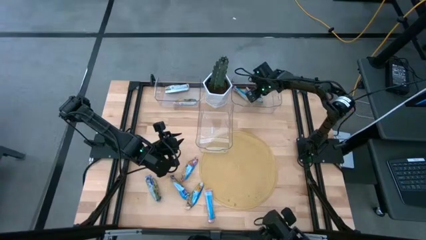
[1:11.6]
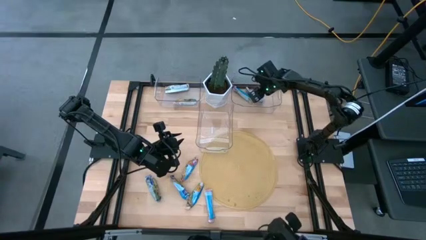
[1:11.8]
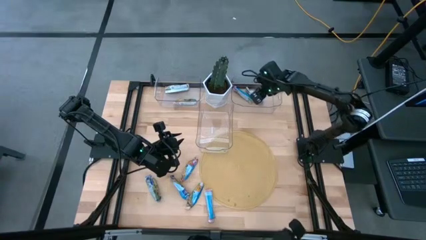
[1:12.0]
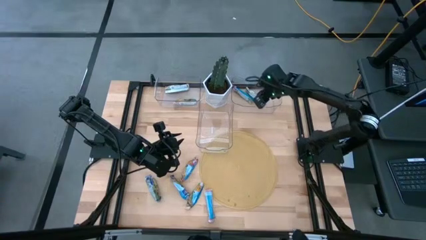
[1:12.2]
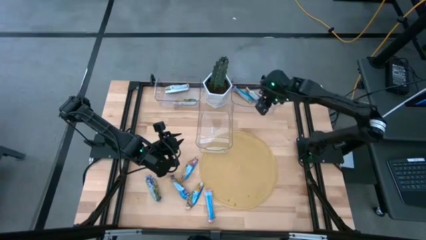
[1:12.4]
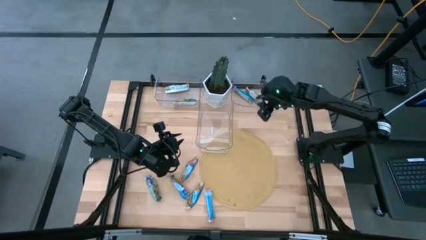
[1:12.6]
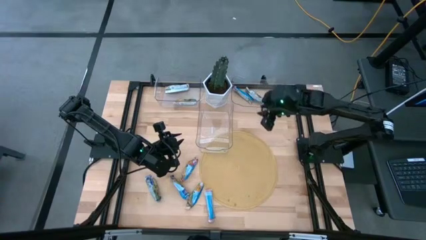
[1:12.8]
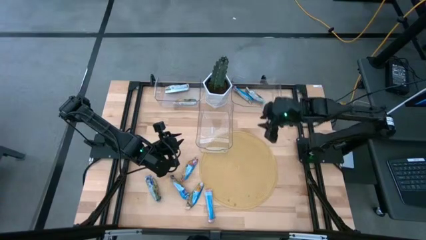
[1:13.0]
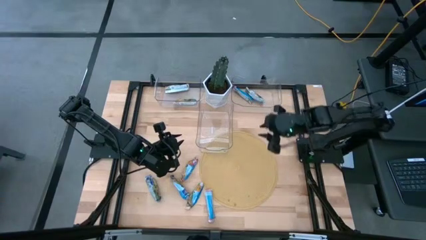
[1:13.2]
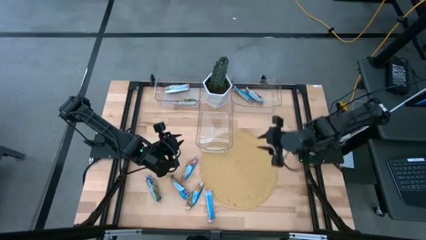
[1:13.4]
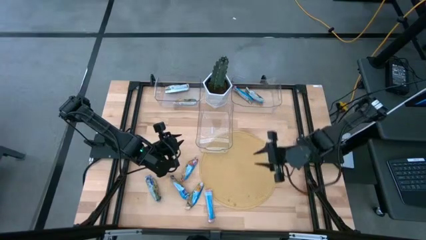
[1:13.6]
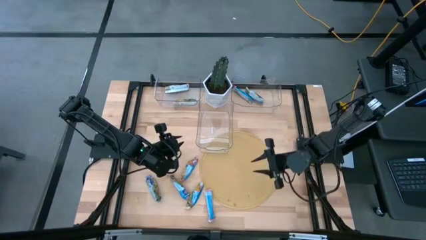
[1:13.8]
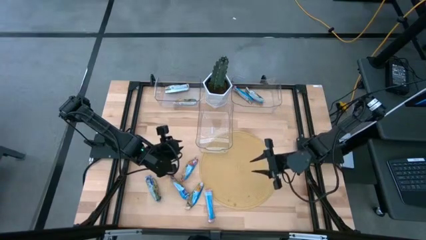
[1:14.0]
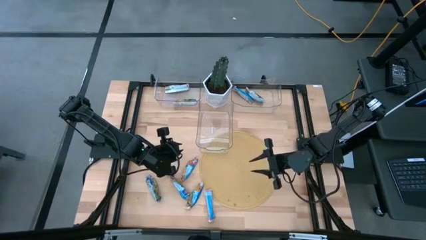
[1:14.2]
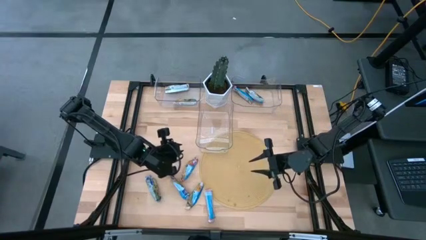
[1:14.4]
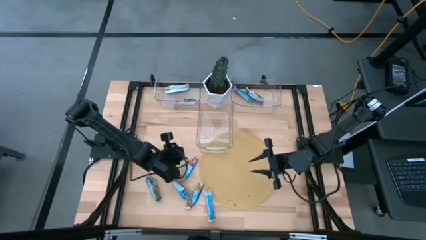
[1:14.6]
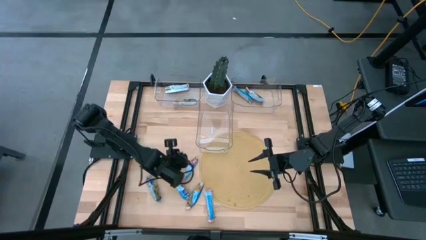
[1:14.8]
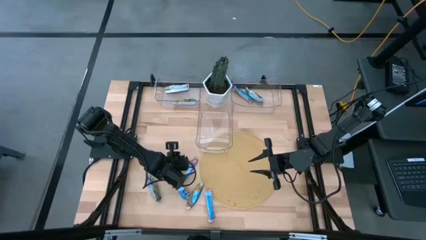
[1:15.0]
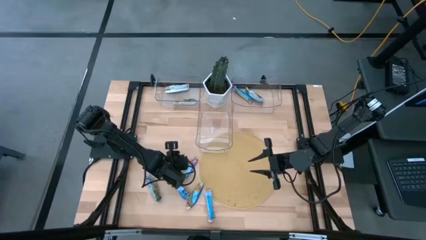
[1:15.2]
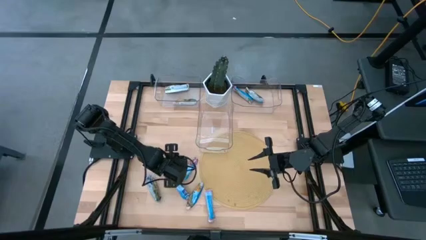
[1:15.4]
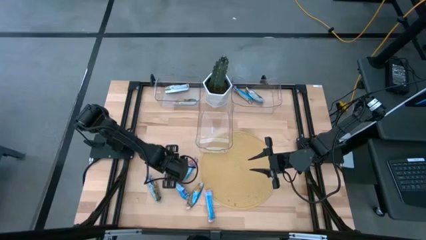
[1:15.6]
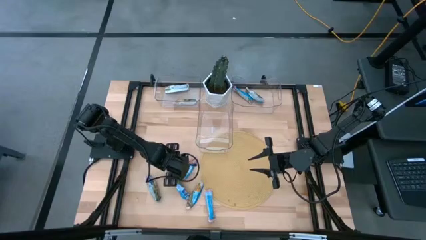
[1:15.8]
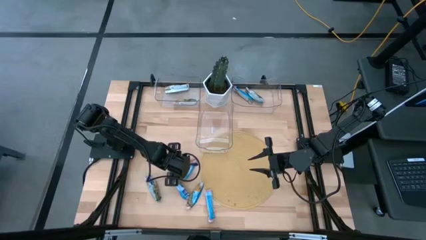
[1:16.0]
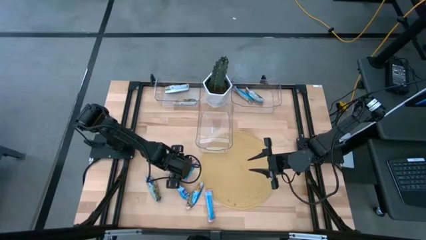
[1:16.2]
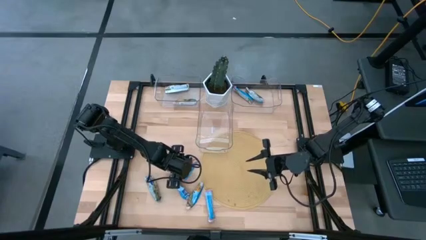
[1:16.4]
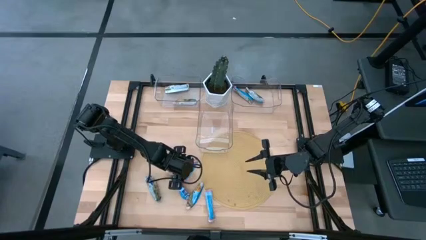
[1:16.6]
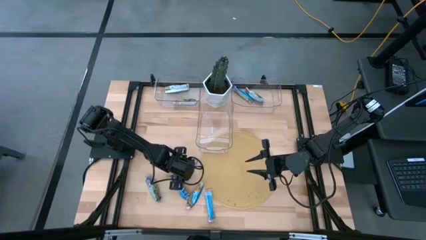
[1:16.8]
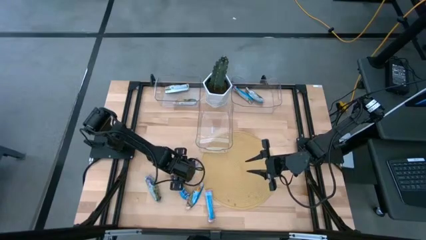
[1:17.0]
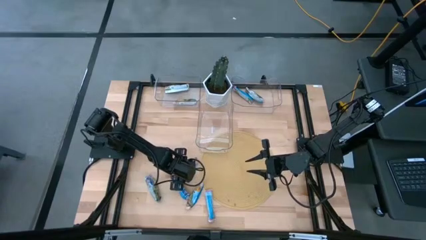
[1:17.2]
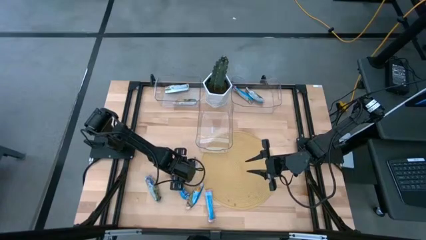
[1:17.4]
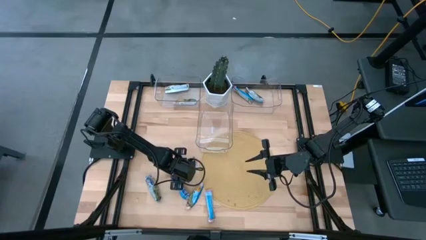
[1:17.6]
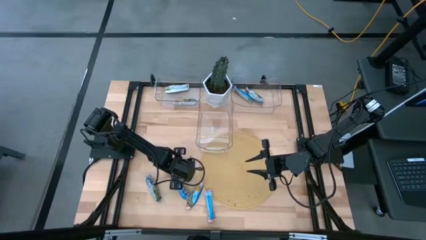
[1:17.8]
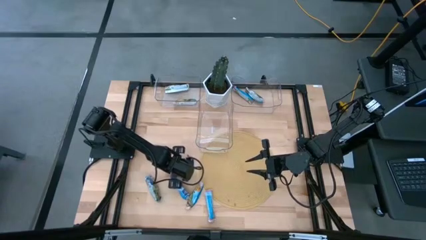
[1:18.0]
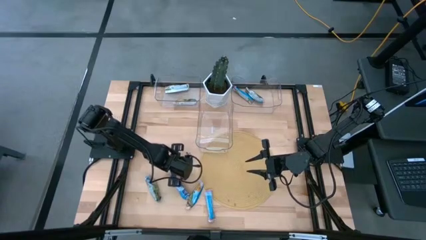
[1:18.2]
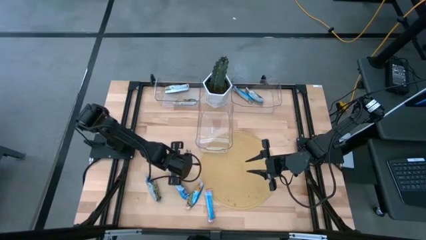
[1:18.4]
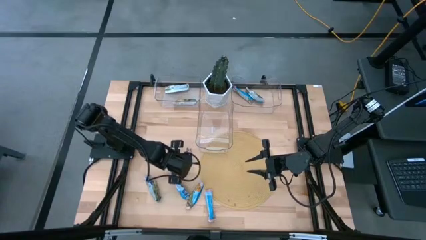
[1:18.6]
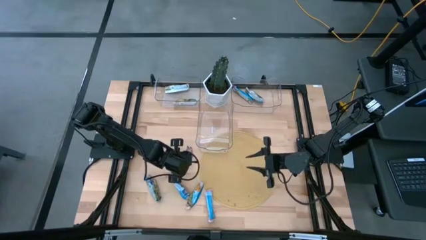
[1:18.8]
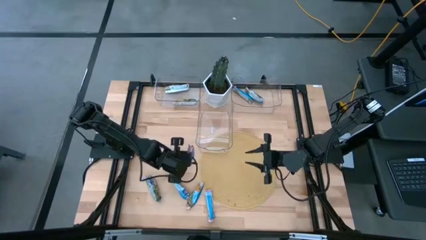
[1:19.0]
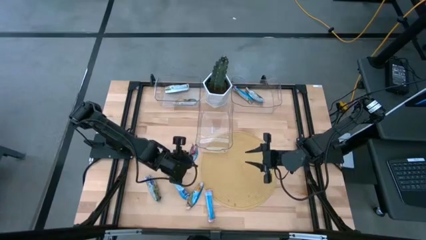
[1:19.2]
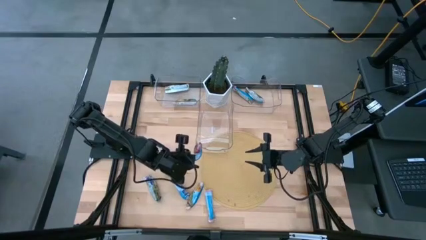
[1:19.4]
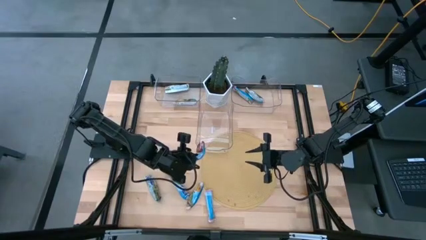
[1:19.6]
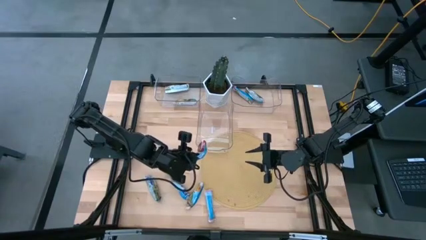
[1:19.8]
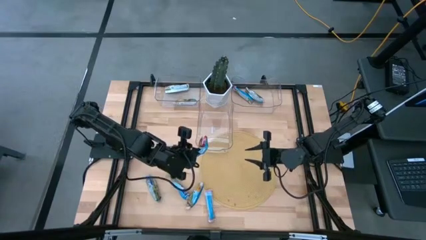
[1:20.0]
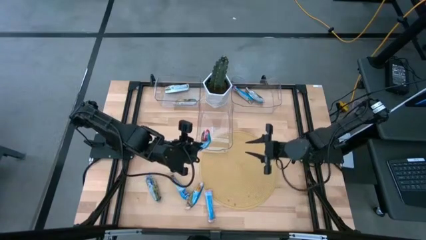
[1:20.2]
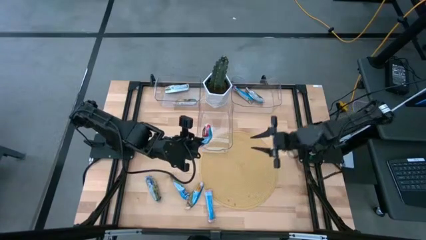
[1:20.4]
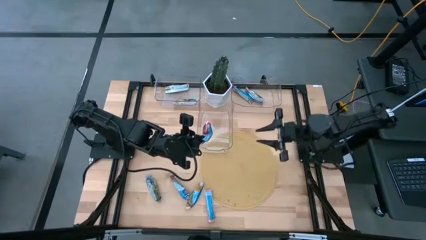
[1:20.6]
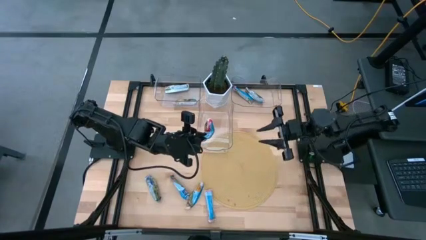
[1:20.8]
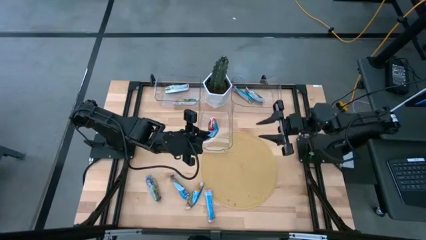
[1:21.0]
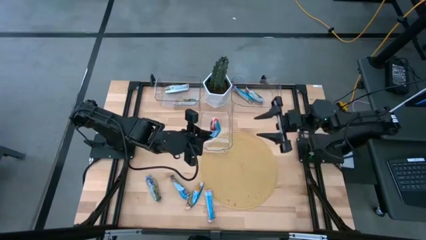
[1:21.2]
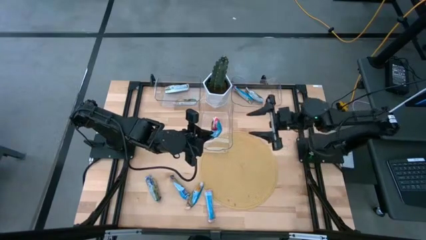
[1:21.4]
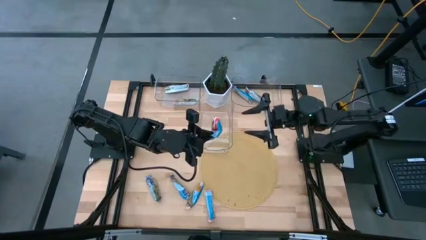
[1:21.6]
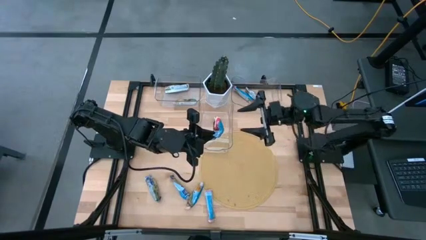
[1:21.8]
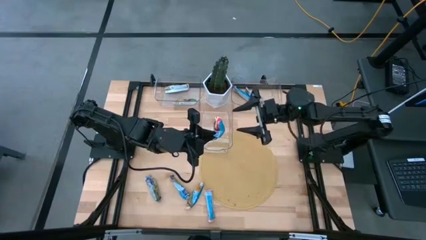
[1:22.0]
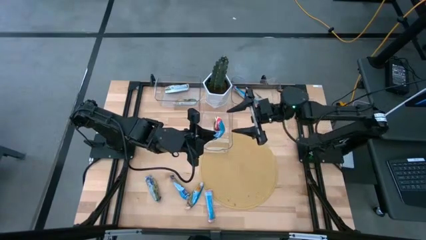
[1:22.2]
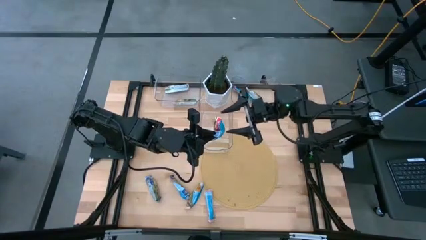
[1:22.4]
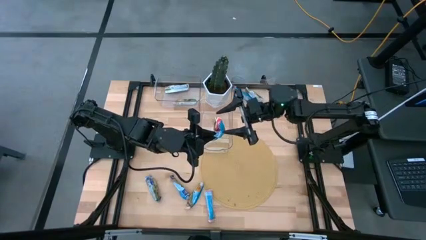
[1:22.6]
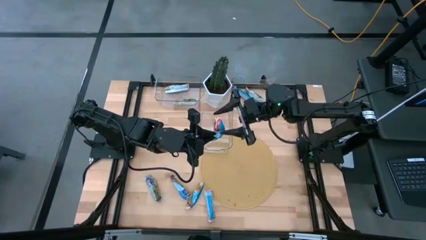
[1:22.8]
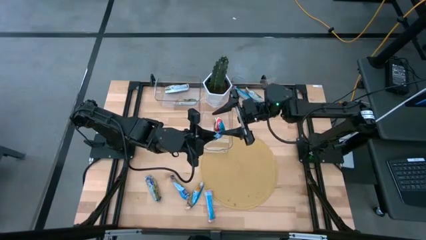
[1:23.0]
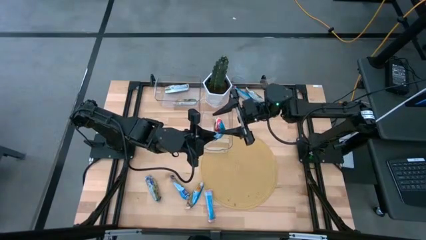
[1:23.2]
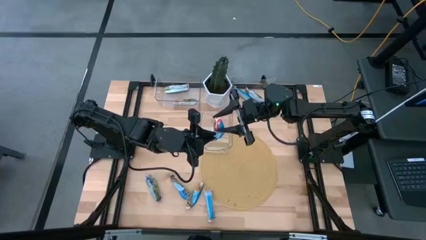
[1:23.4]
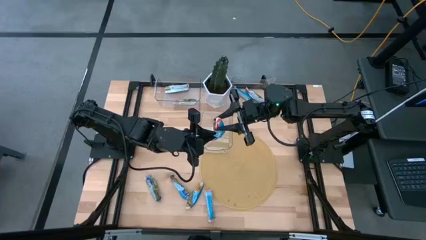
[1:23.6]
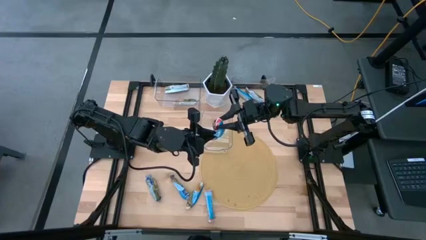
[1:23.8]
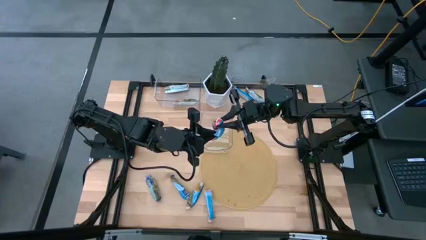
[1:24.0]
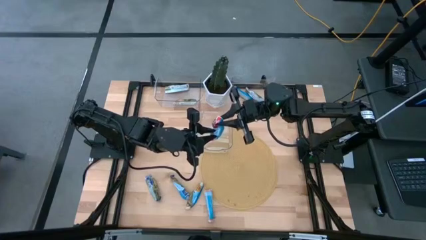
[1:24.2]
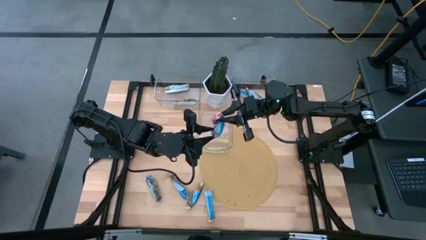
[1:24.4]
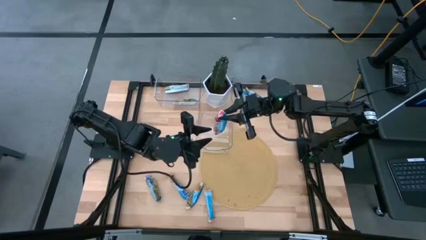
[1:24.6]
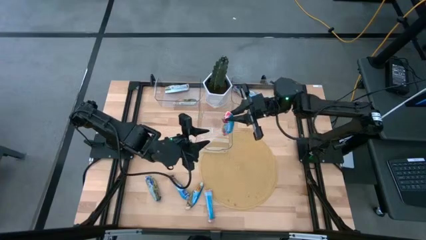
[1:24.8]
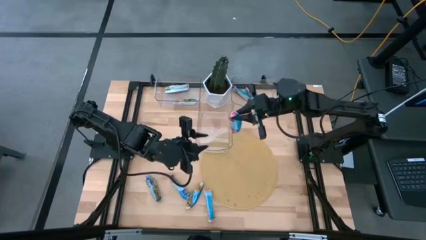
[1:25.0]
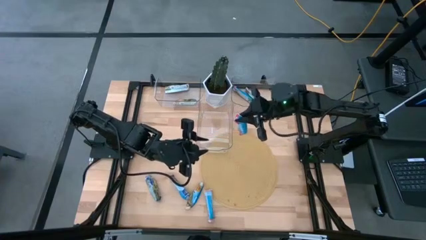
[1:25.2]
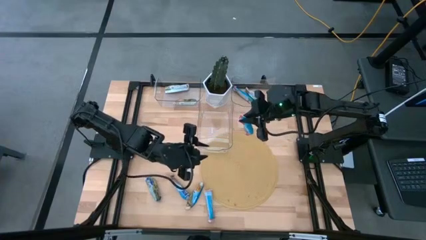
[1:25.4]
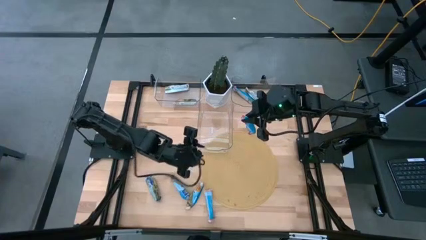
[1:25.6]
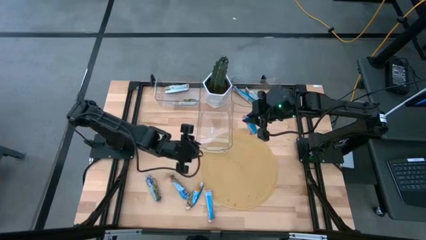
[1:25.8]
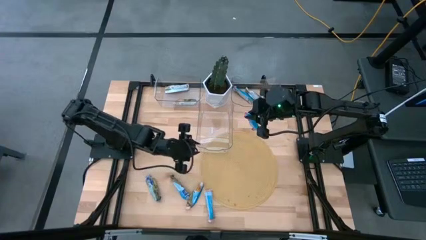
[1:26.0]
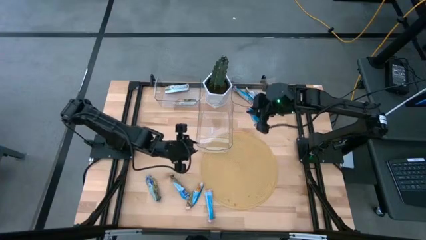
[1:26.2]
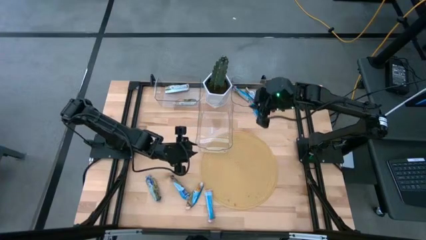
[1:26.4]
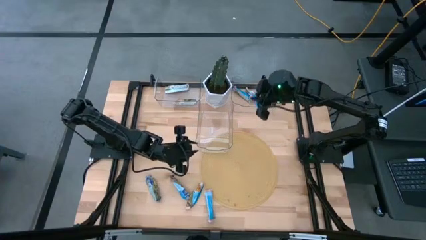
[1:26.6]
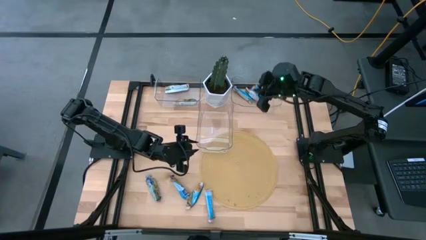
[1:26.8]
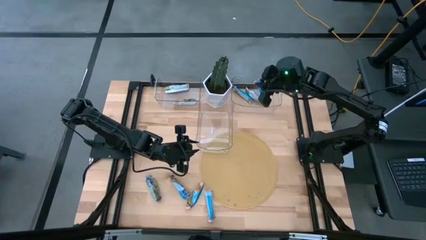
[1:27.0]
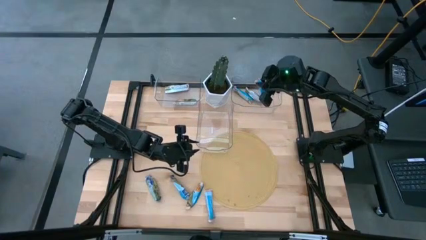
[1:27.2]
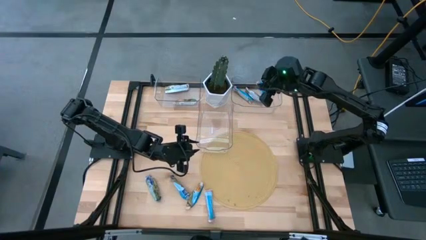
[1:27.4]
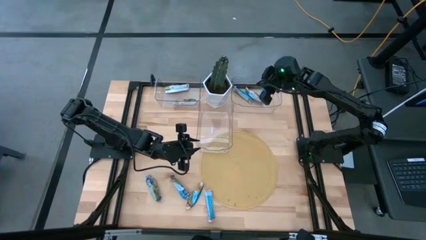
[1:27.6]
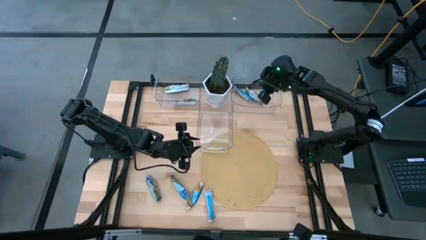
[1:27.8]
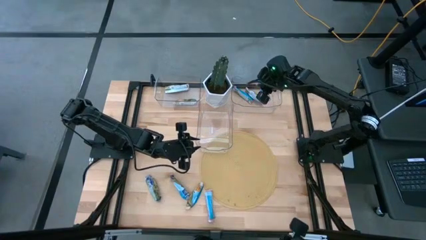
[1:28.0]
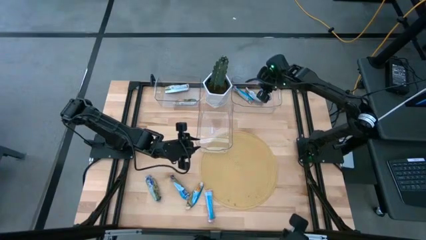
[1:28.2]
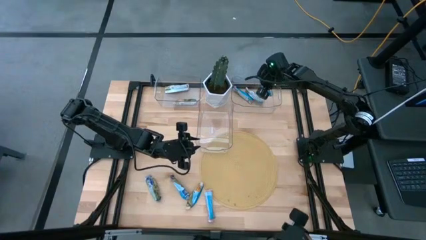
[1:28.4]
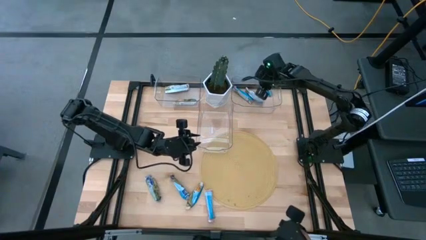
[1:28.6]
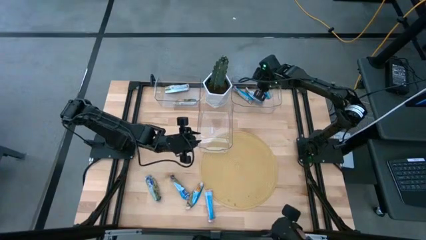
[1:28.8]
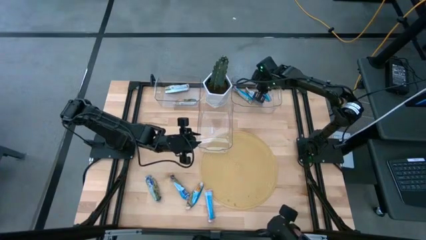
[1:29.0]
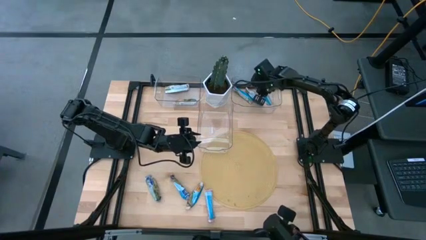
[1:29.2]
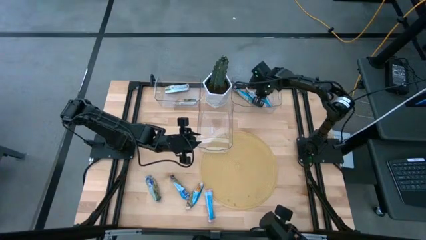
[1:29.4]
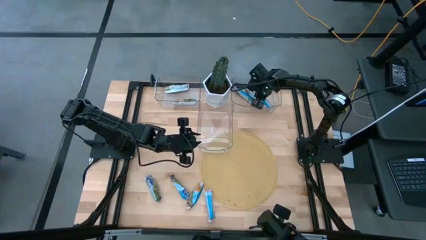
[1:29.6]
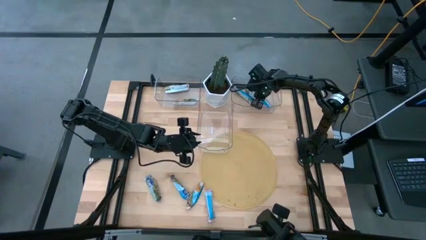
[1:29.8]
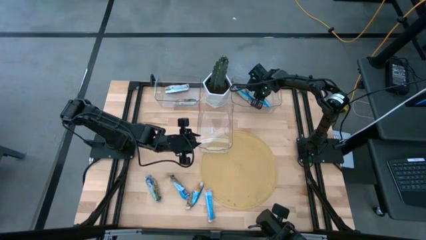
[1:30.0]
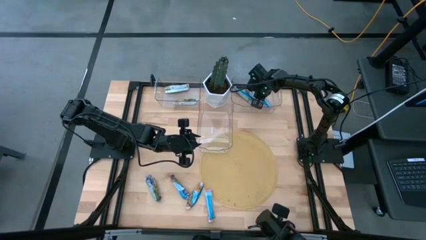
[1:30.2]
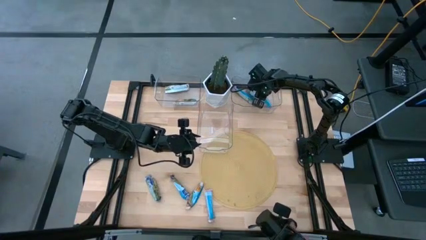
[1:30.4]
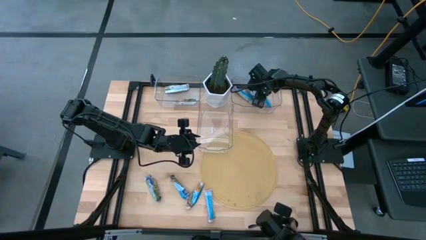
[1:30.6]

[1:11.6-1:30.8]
Task: Pick and place Granola Bars by type
Put the red green granola bar into the right transparent bin
